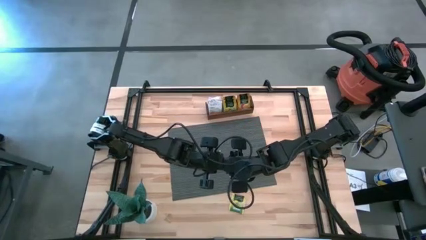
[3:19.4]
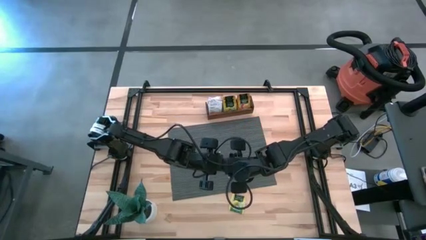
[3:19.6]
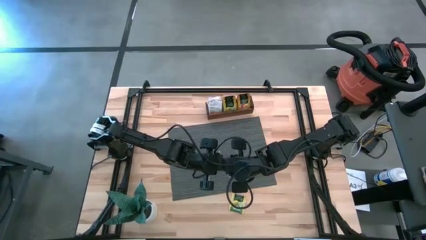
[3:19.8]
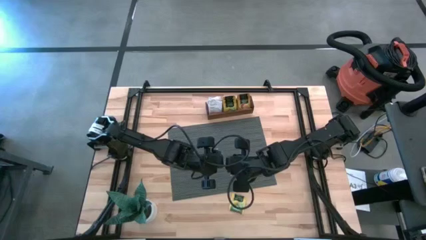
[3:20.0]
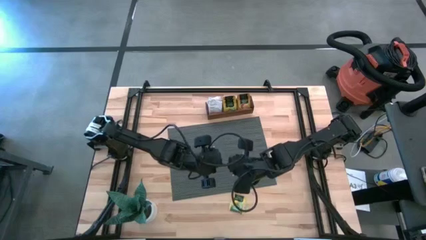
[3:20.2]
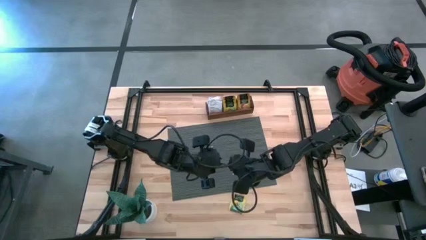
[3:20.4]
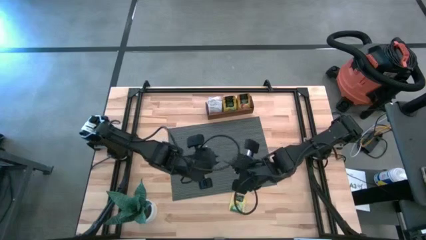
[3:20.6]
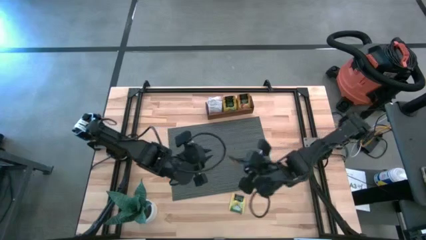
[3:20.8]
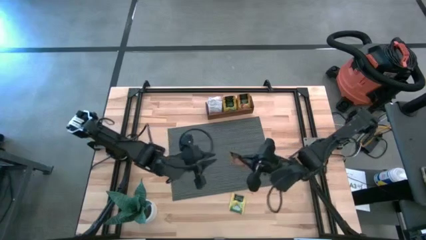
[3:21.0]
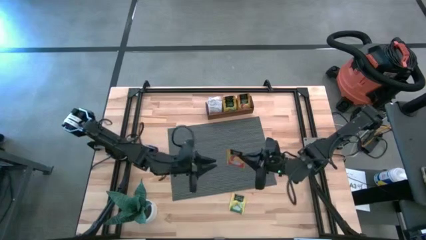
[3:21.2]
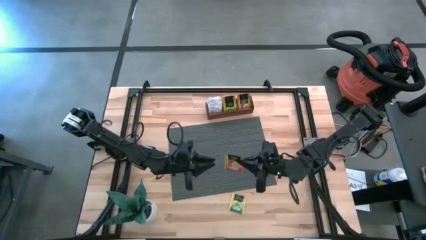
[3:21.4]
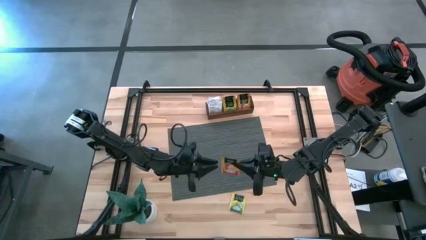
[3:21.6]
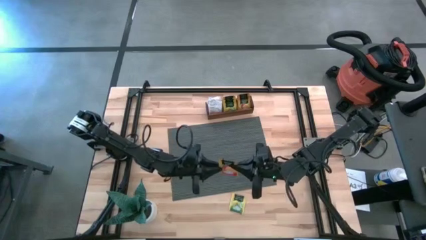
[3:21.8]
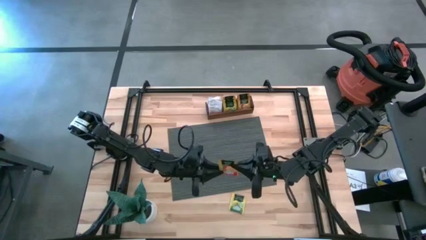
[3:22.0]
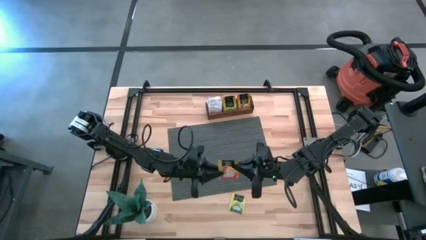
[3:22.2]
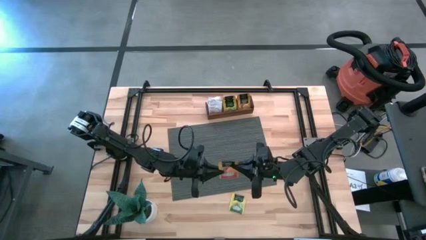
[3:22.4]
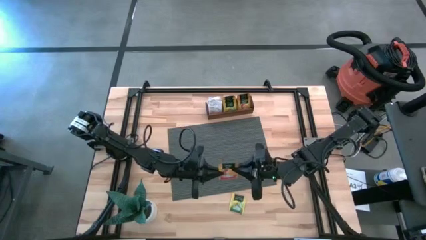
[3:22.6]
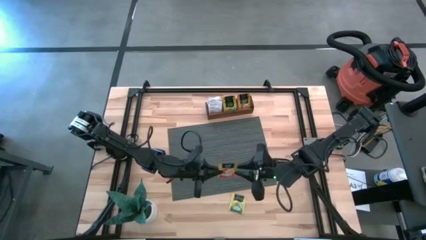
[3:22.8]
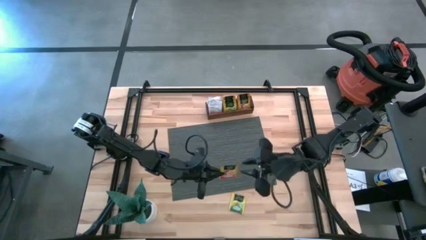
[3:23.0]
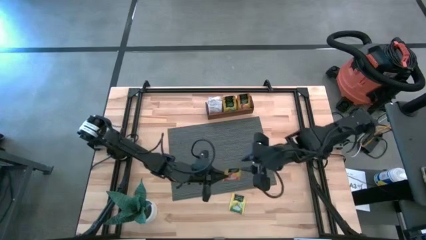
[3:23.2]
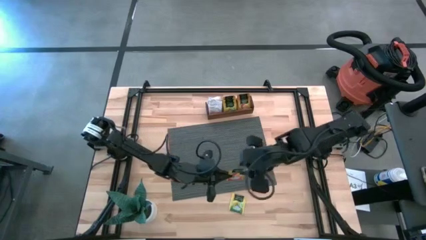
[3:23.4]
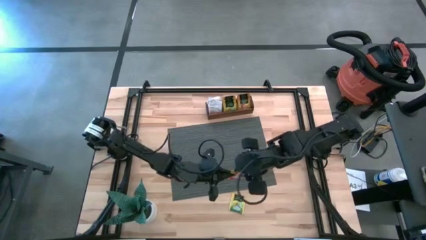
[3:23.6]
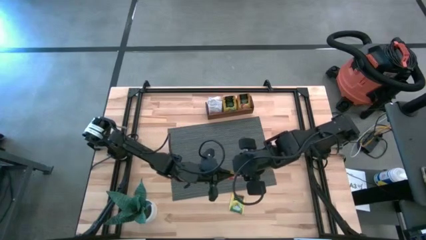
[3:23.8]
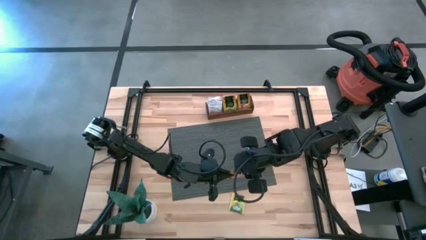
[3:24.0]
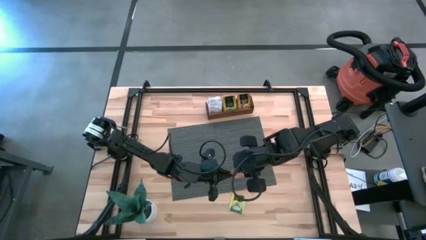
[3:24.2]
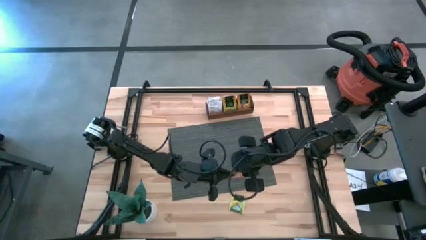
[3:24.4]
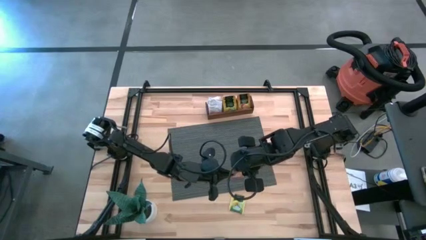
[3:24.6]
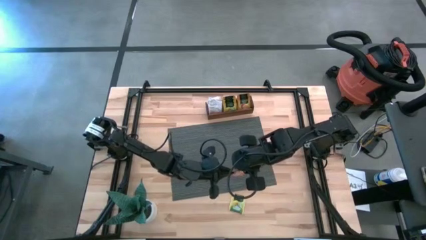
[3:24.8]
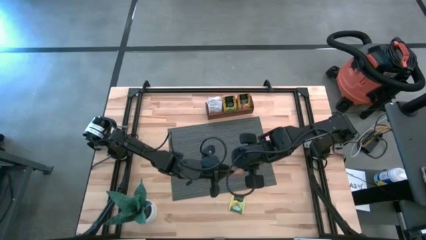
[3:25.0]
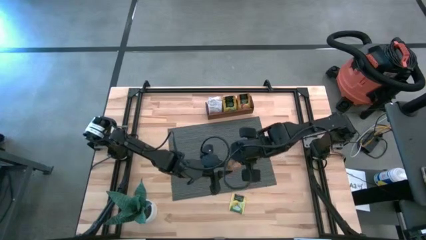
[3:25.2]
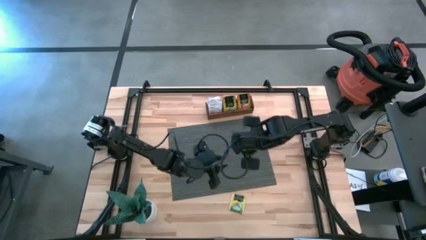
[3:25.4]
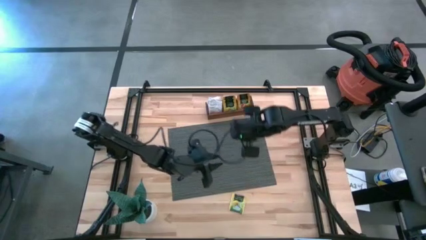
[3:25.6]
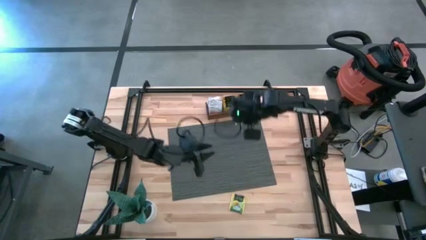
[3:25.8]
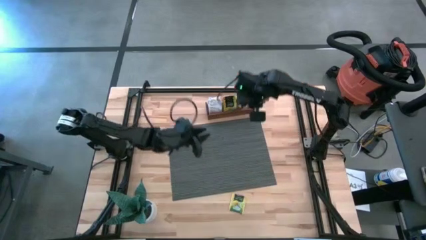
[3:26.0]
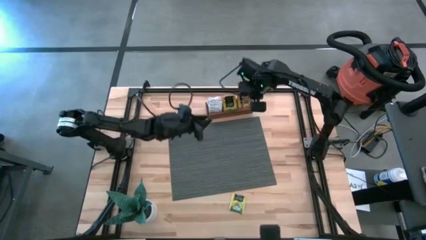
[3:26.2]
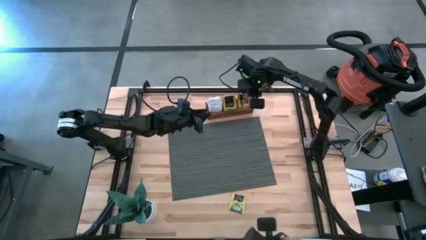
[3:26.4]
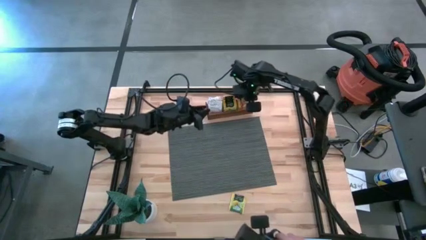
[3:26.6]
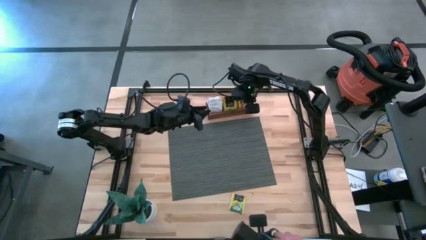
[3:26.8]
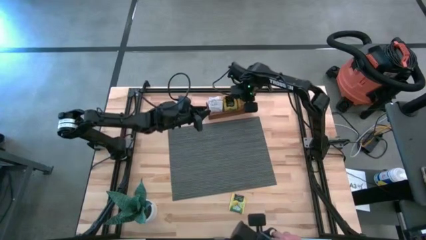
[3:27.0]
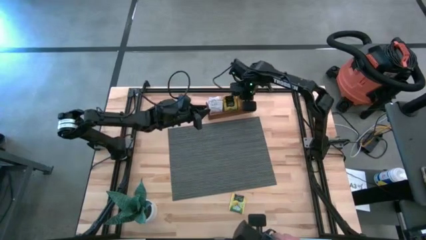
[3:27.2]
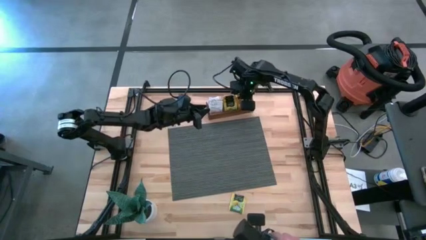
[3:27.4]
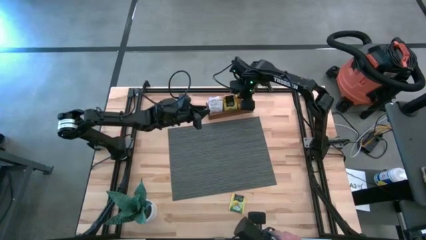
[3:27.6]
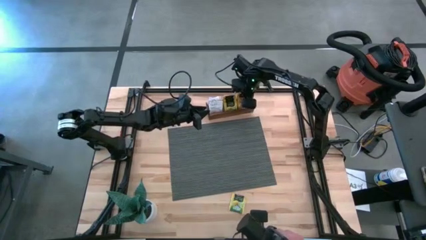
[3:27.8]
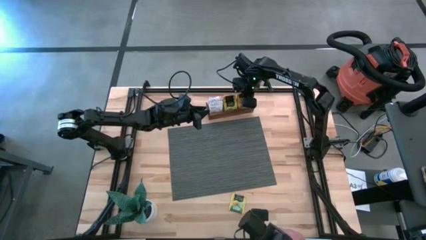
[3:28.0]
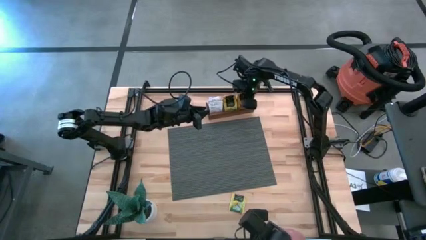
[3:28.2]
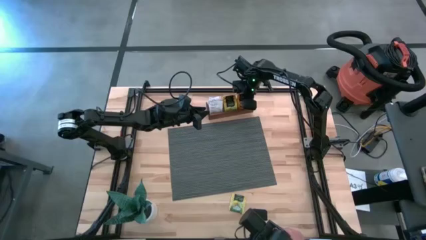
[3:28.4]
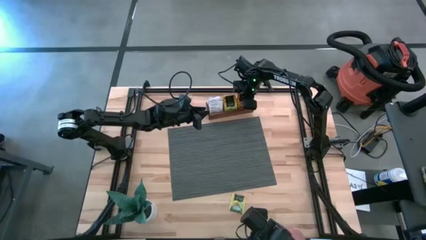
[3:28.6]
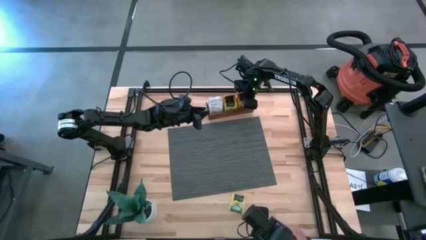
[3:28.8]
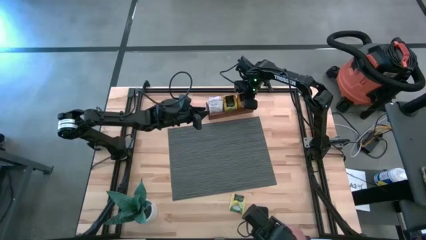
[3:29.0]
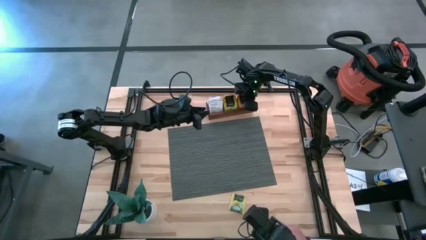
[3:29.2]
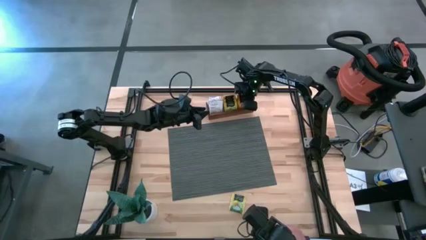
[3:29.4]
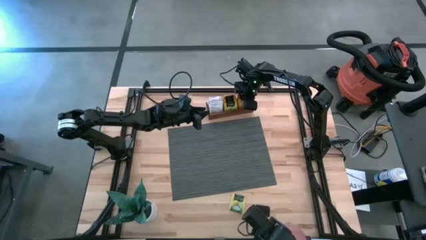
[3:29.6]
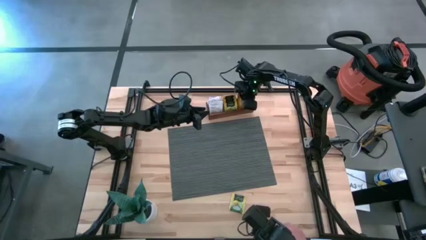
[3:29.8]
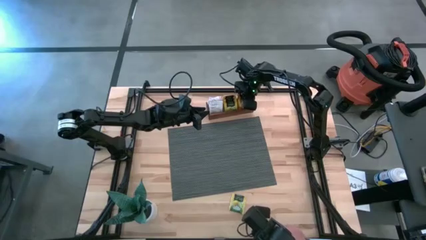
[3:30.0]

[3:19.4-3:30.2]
Task: Pick & Place Tea
Put the orange tea bag into the right section of the wooden organizer

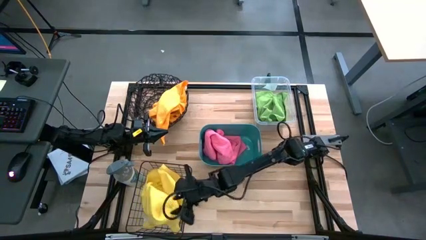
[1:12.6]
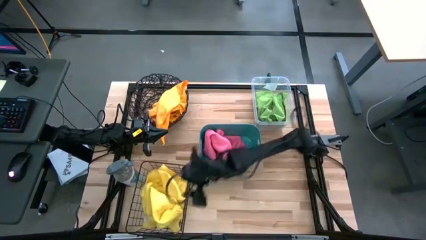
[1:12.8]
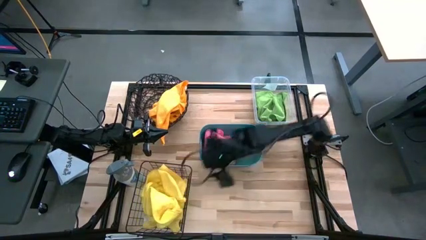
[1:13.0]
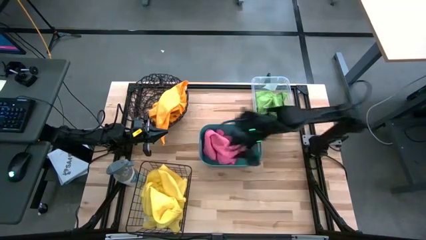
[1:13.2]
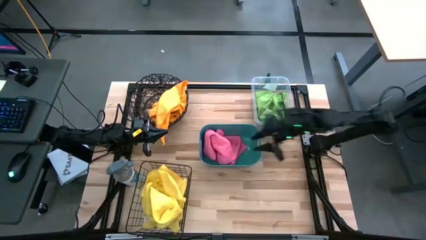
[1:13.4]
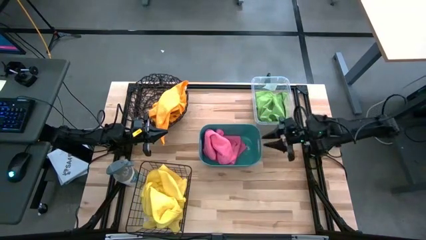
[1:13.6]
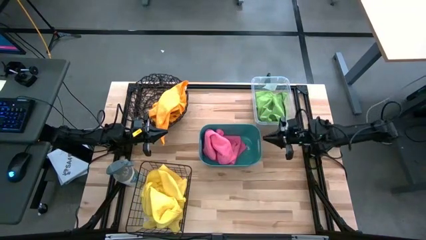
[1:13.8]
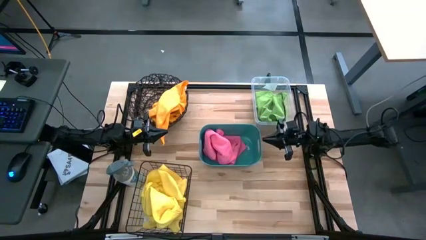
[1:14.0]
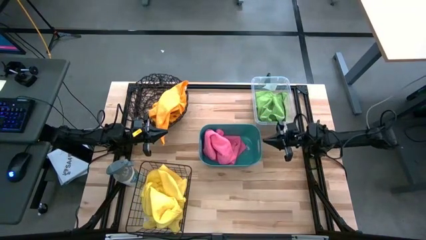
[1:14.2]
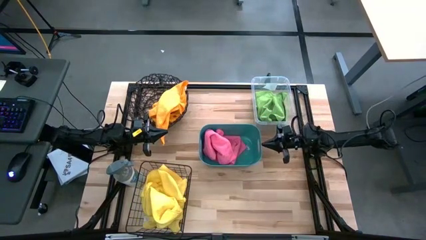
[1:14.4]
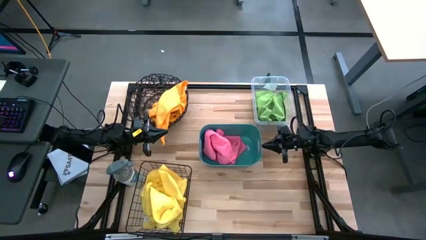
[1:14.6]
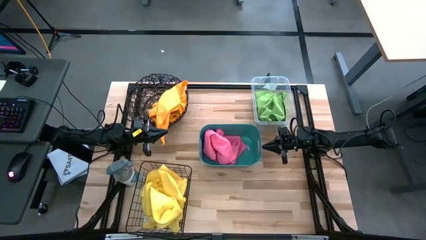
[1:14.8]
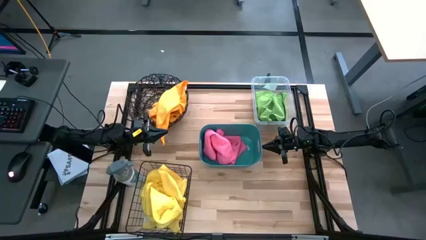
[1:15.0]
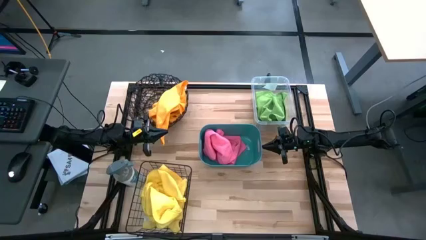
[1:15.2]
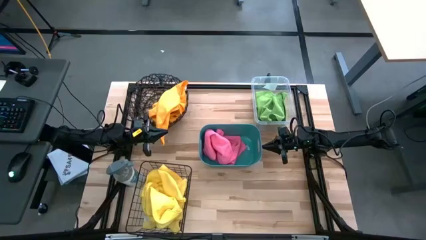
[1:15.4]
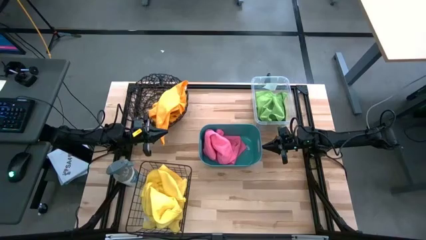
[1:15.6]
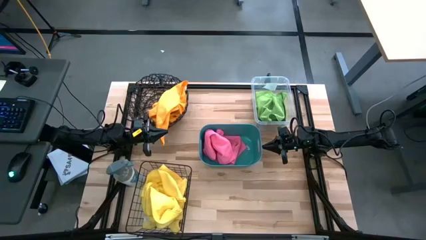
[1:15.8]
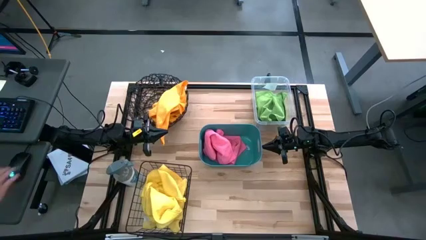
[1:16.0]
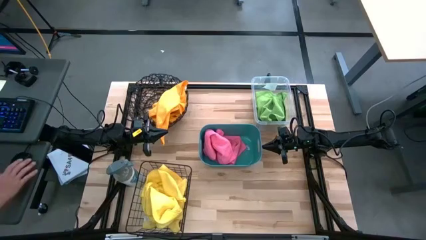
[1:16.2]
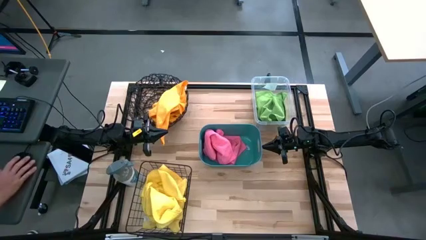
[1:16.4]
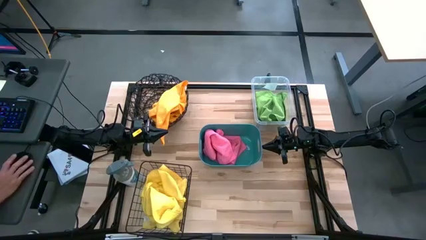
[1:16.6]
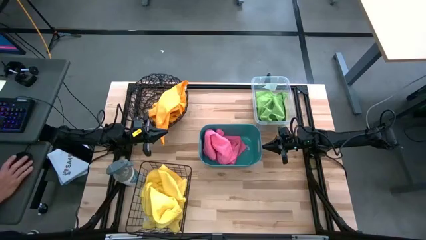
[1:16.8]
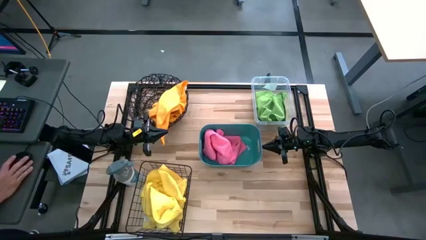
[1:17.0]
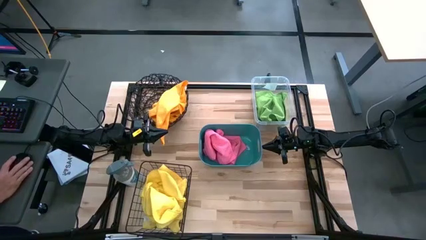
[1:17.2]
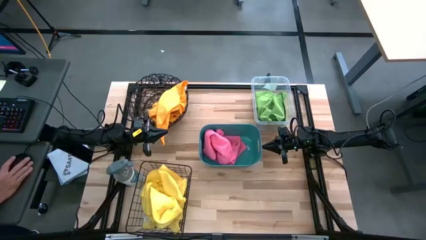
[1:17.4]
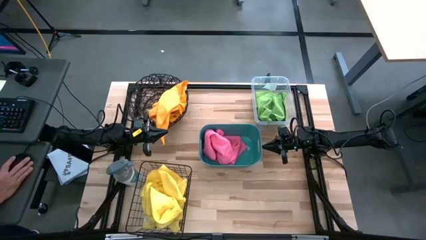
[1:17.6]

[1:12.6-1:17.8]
Task: Sort microfiber towel by color & place in baskets
Return to Home Position

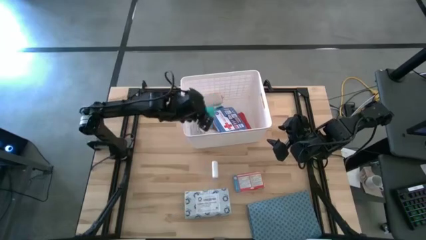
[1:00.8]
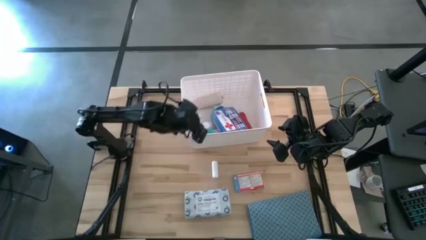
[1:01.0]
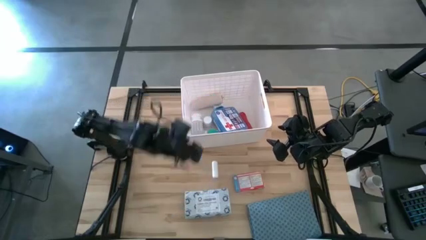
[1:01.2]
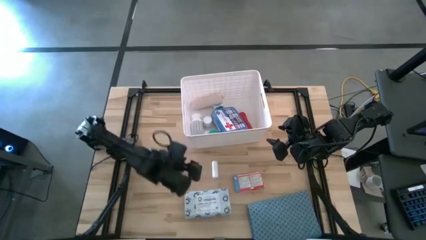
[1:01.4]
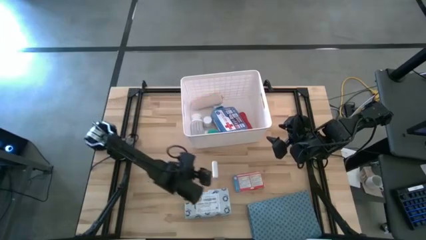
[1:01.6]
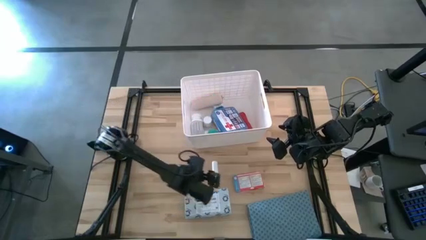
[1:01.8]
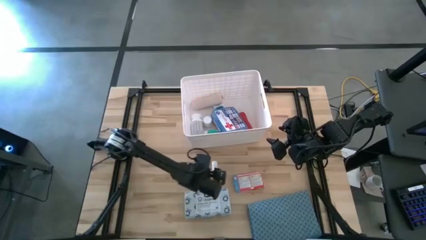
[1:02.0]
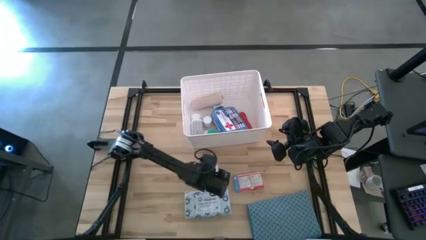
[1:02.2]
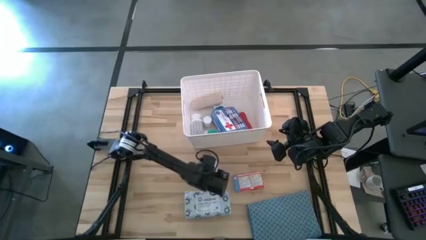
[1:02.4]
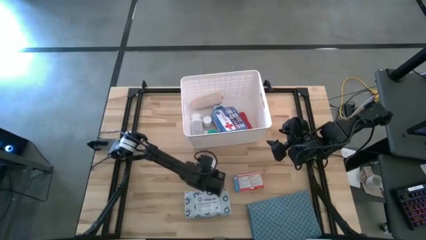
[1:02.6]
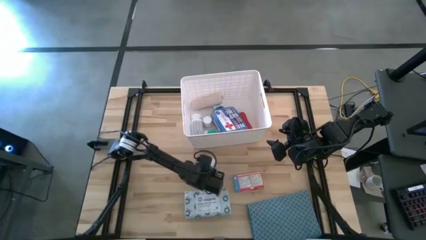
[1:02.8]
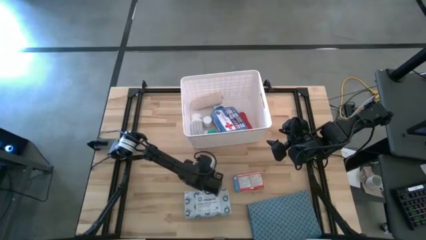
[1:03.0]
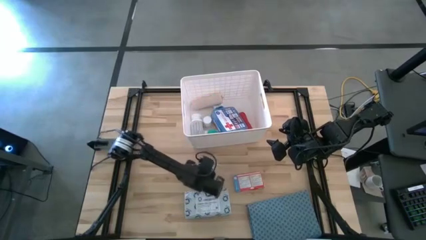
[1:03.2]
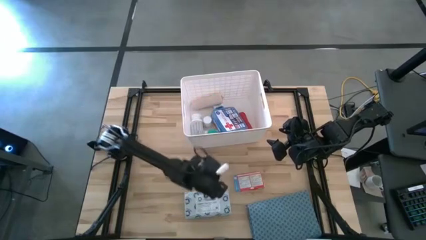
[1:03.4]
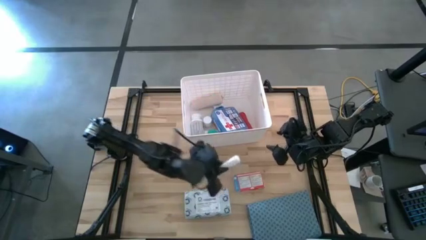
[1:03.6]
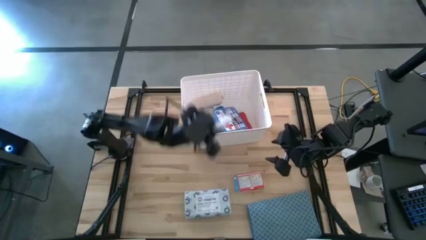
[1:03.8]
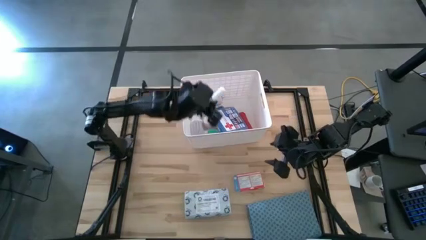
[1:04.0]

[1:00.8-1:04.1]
Task: Pick & place medical supplies in basket/bin
Put the white rolled gauze into the white bin
